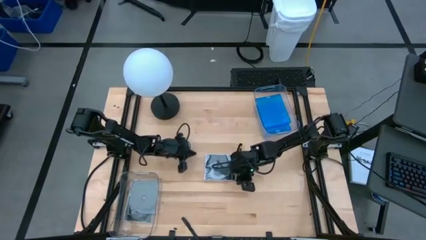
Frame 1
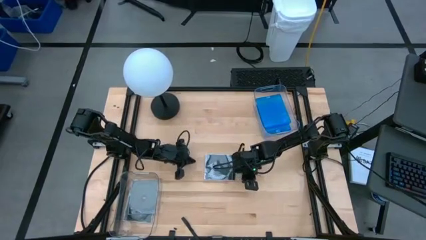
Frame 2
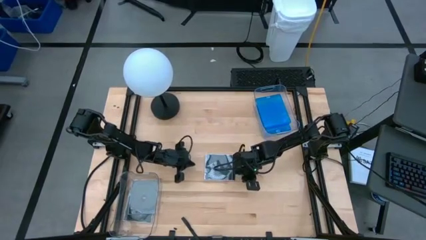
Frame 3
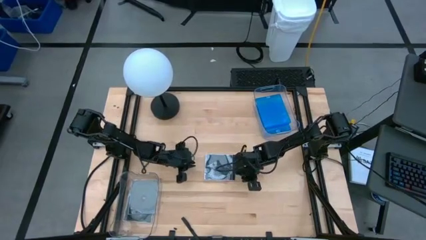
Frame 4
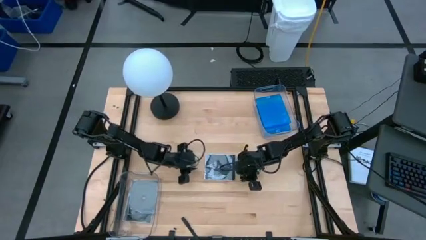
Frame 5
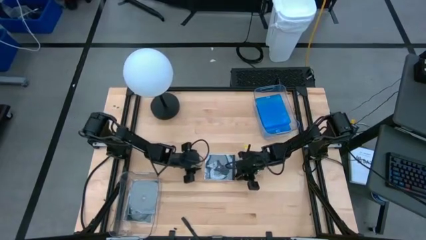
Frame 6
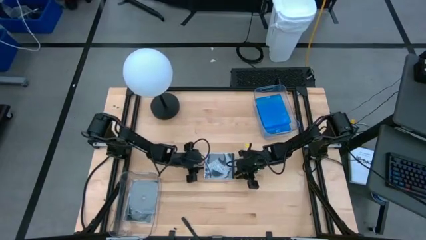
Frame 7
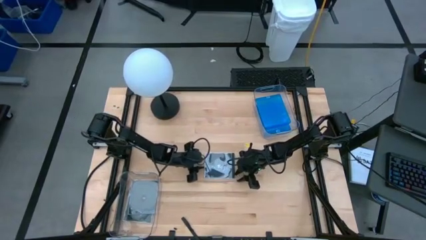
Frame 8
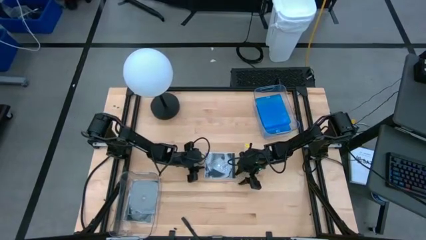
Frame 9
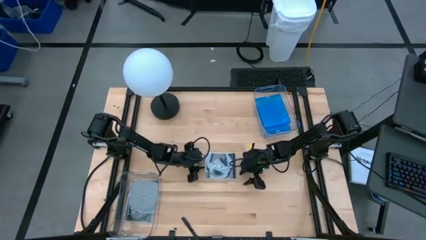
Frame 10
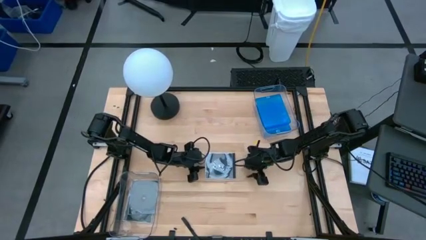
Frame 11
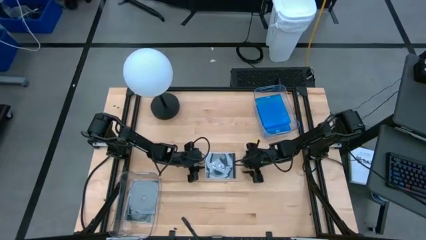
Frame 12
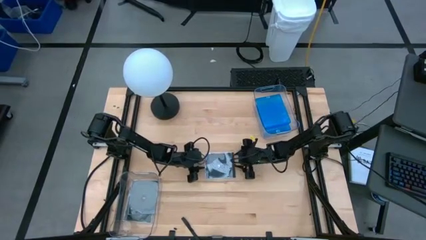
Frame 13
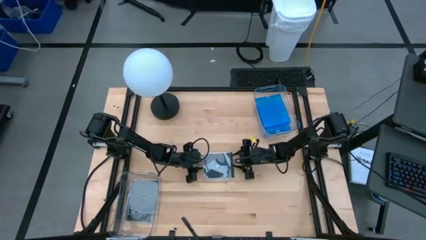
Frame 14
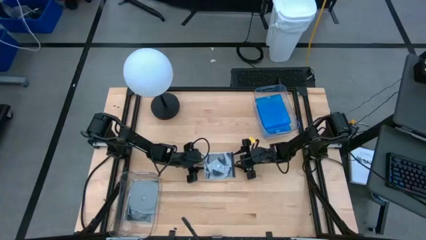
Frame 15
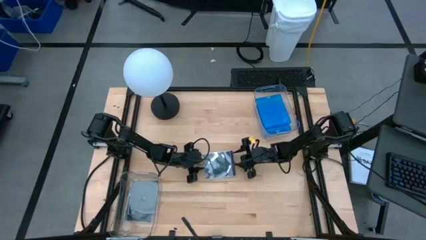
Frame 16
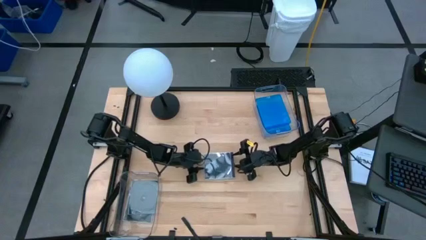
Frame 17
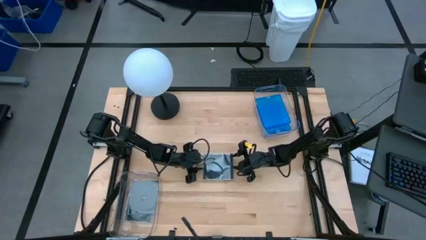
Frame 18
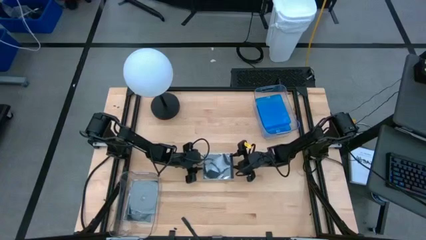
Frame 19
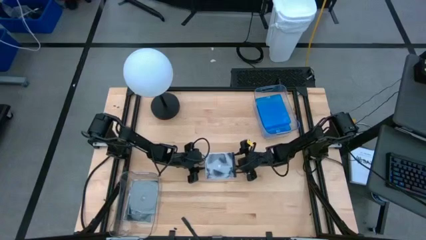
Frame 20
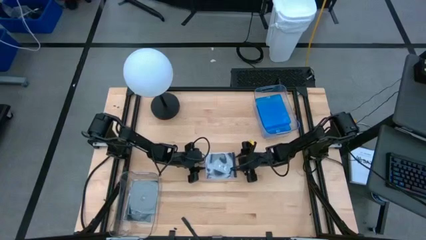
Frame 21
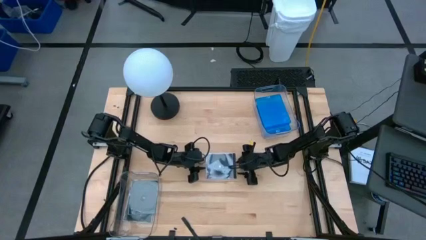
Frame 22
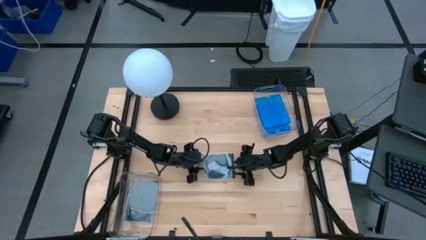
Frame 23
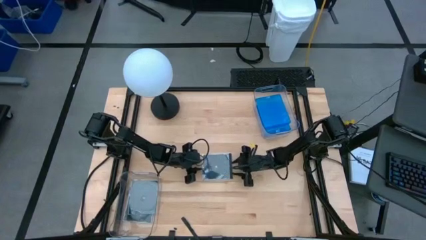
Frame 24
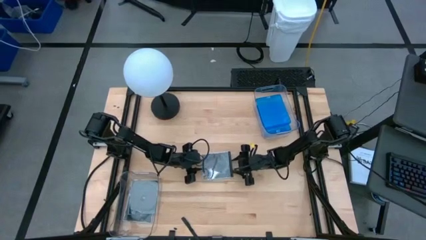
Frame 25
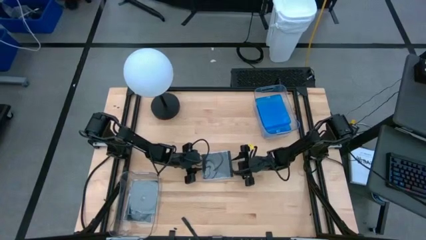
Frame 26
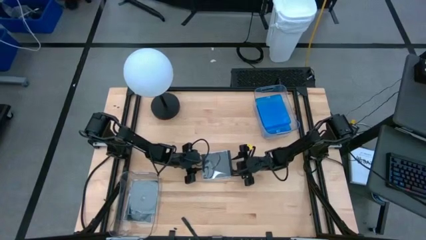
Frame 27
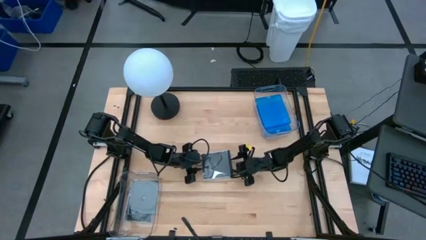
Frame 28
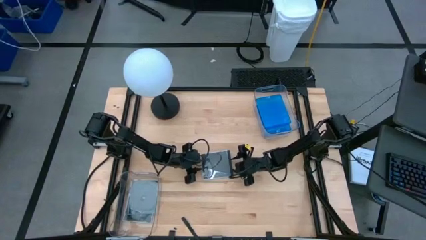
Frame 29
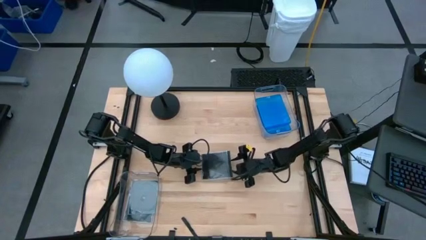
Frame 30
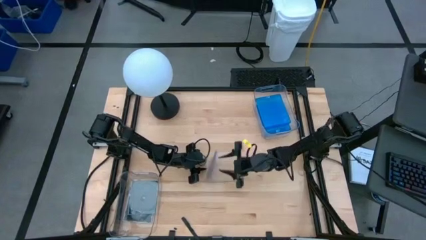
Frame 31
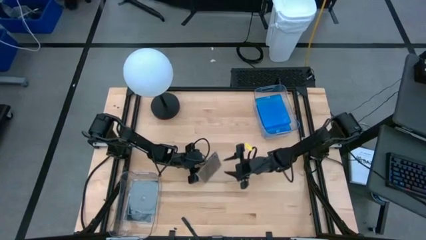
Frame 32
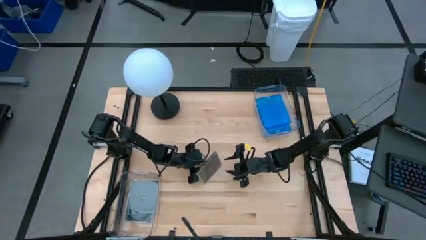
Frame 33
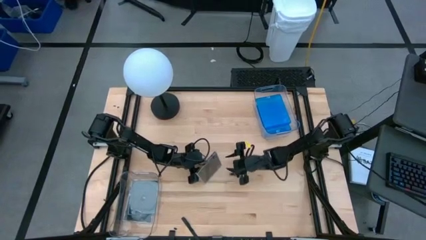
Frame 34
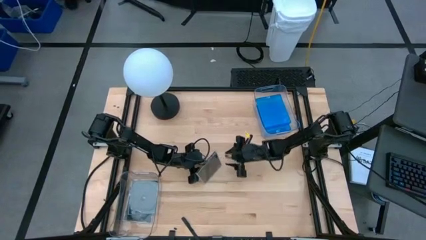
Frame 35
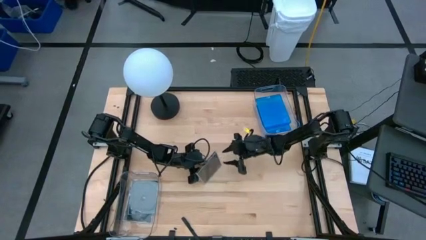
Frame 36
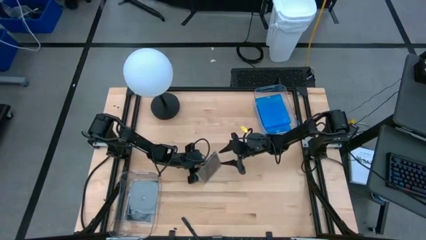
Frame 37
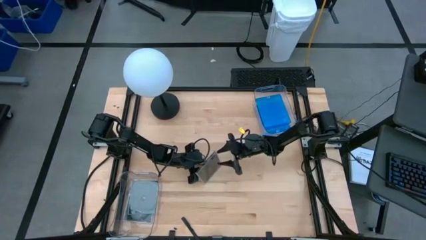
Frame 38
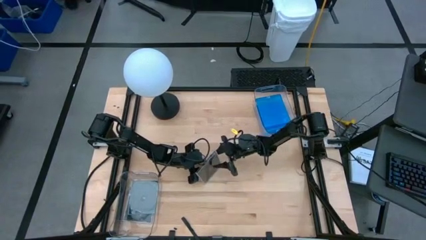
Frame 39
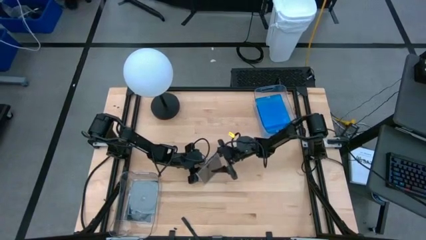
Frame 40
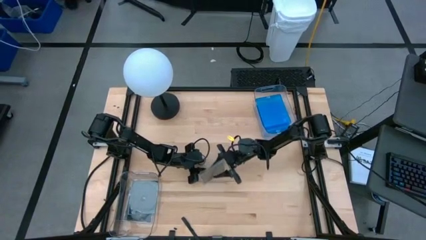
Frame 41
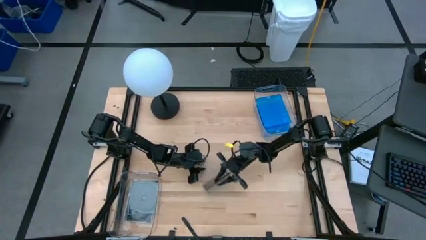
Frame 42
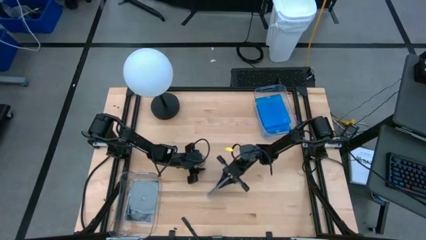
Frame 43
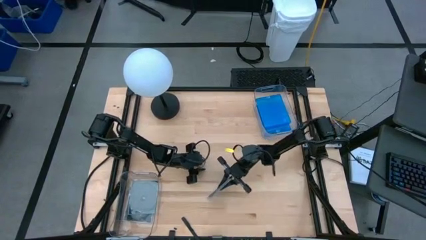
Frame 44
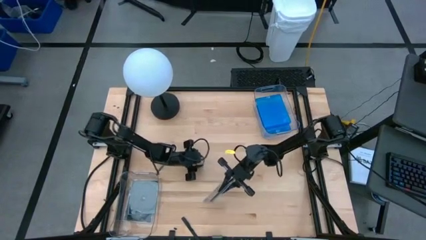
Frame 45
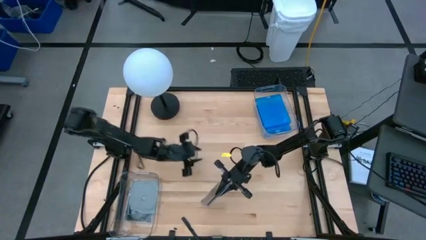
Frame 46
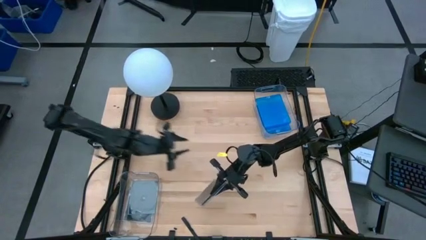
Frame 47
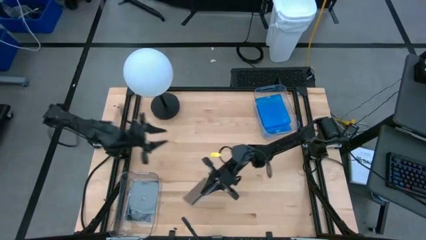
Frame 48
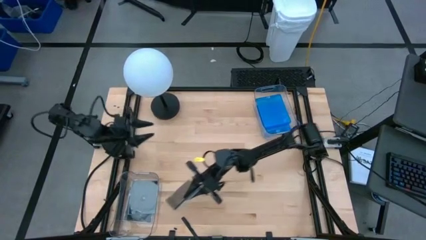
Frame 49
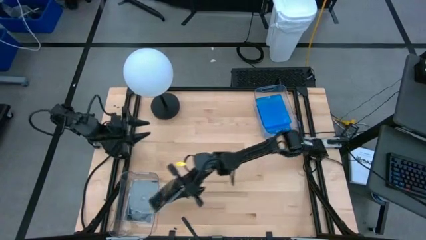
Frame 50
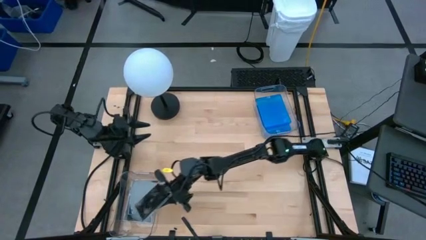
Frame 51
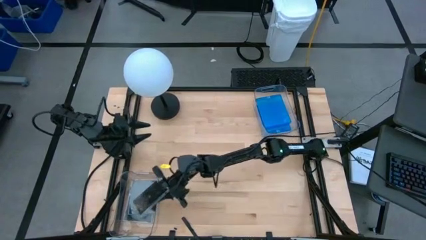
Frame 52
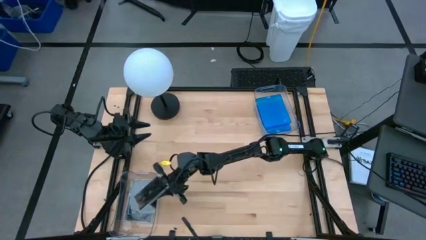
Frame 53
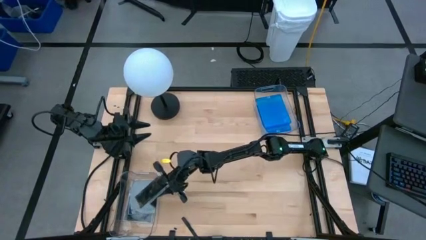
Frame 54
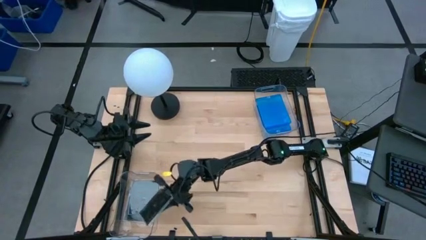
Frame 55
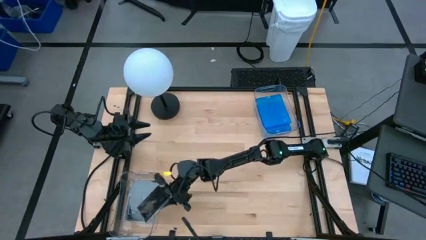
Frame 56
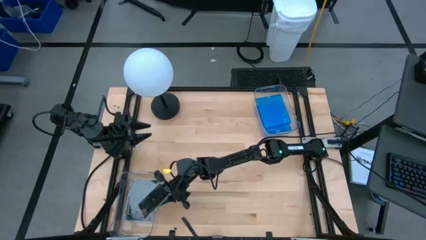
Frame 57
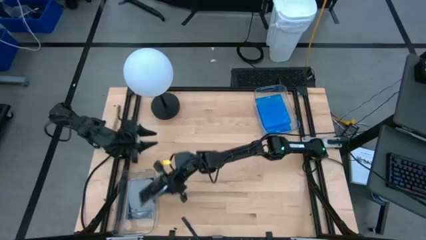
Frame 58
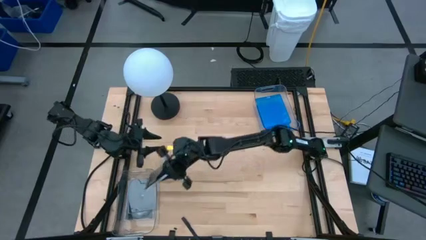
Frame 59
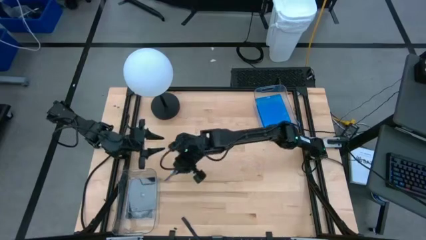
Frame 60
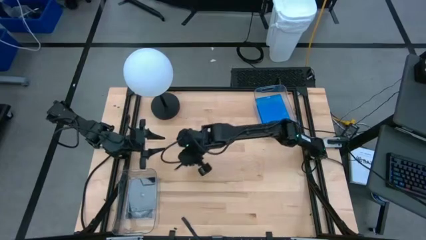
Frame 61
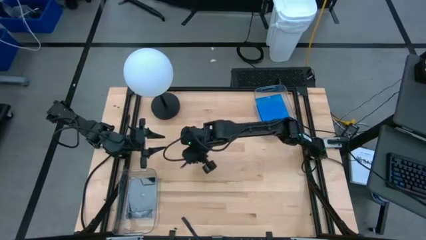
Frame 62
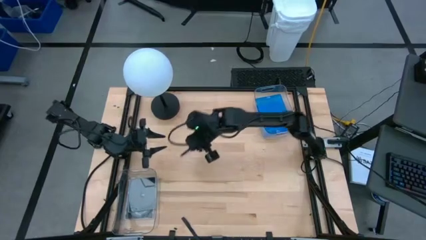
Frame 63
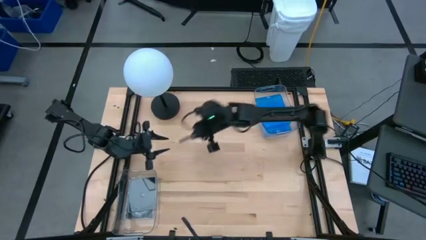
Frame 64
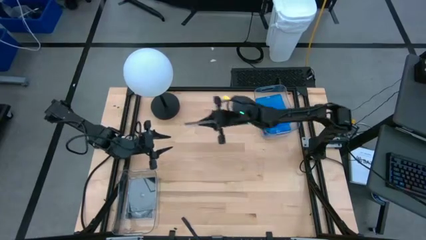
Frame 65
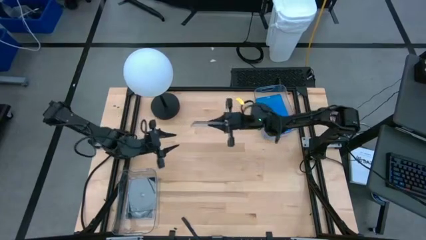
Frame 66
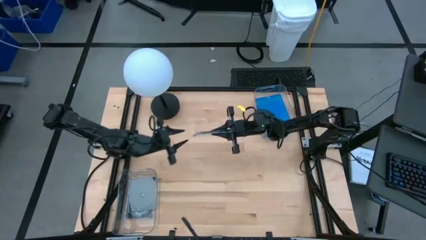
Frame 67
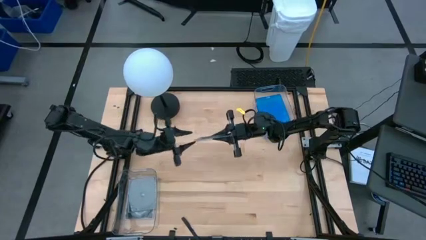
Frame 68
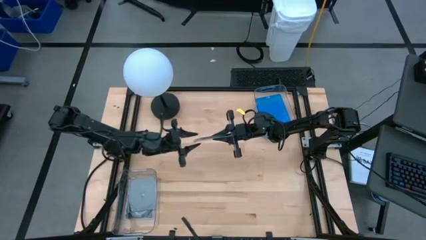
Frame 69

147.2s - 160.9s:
Task: Pick & place jewel cases by type
Put the bottom black CD case into the bottom transparent bin

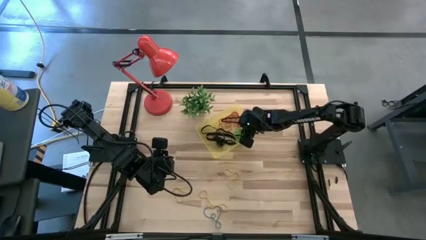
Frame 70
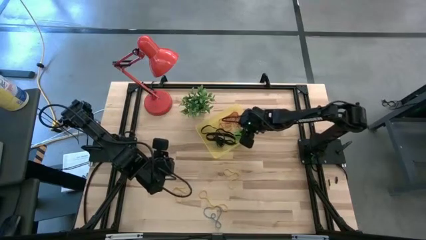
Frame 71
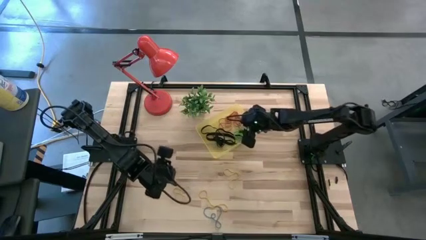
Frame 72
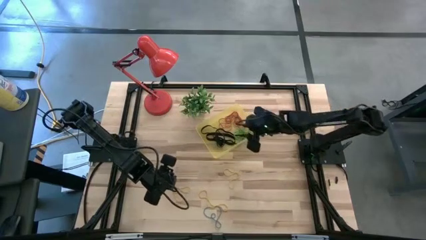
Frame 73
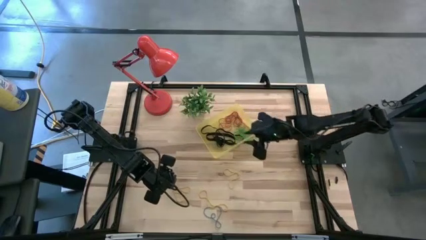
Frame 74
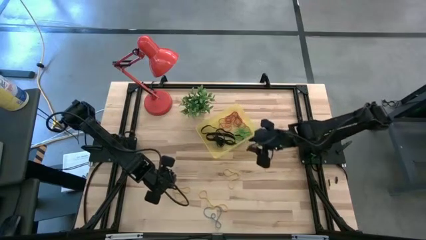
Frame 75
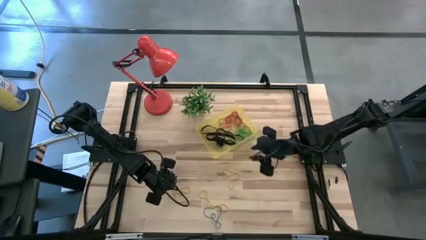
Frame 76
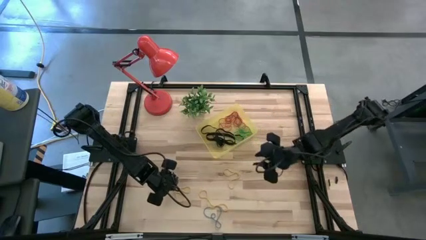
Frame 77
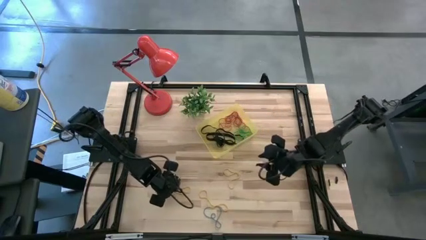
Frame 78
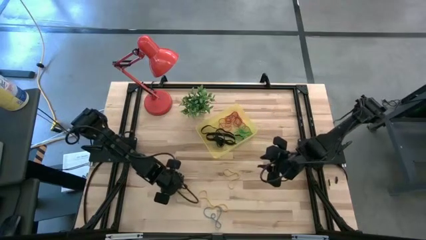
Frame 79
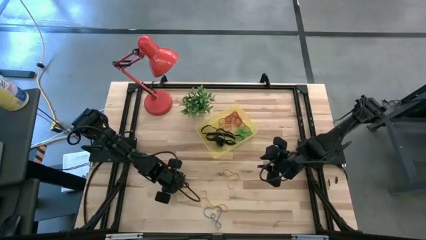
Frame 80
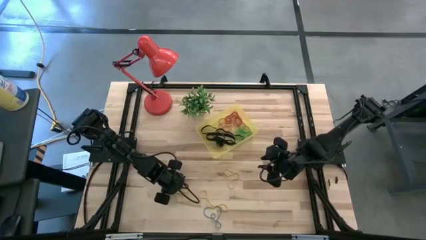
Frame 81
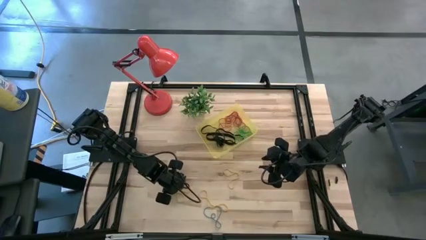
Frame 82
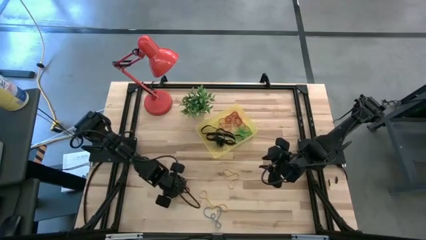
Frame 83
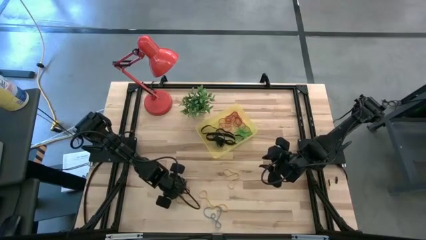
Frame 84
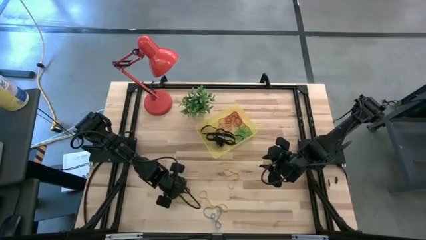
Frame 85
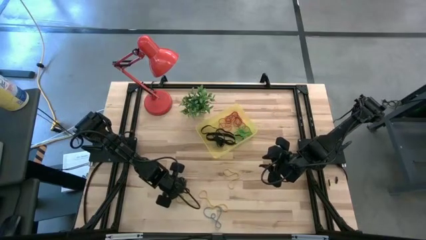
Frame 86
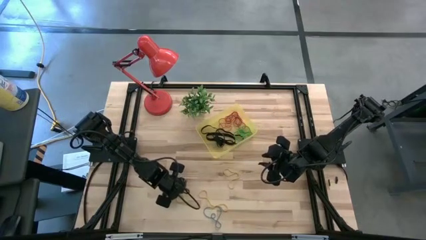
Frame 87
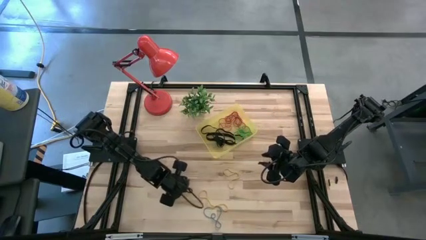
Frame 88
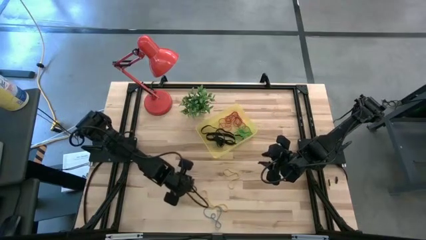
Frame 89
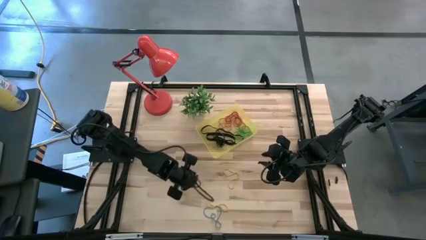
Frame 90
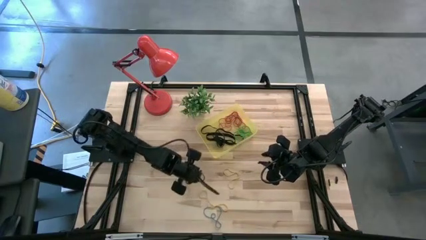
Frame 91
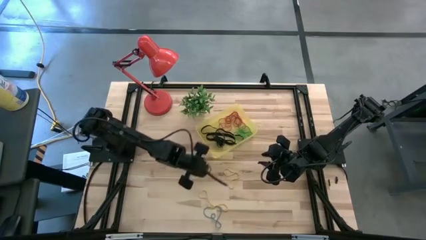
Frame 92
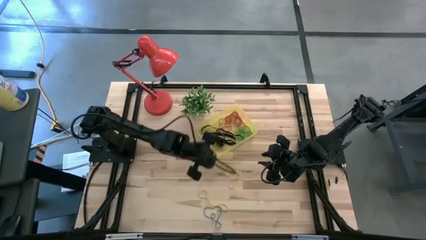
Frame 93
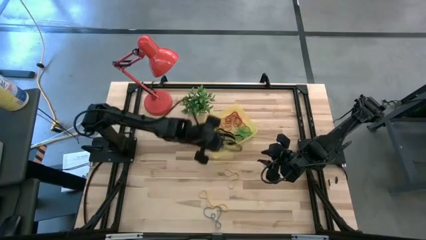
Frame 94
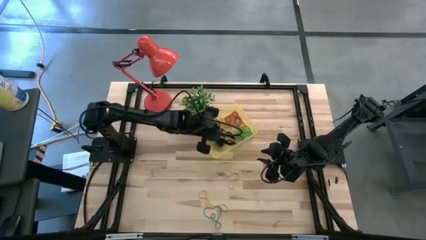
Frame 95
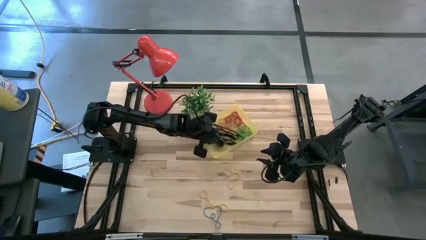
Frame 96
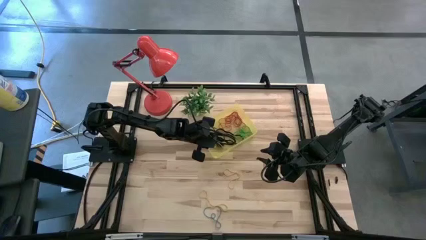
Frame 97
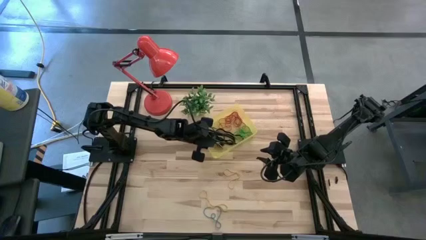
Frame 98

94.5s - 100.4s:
Task: Pick and place rubber bands into bin
Put the yellow rubber band into the transparent yellow bin
